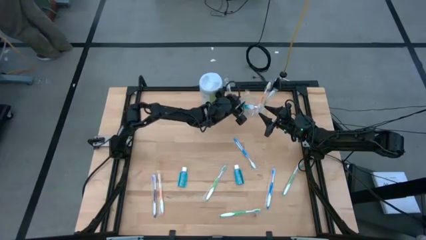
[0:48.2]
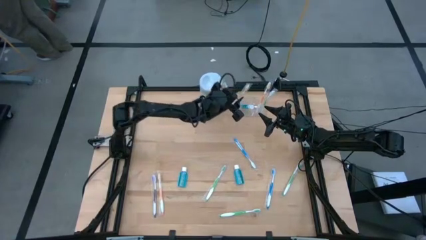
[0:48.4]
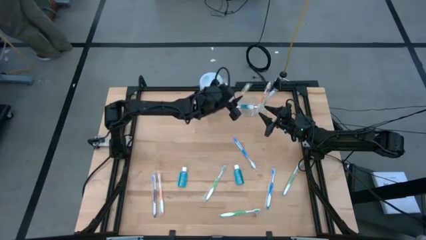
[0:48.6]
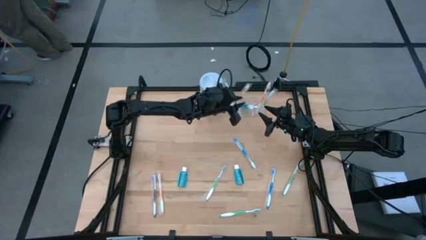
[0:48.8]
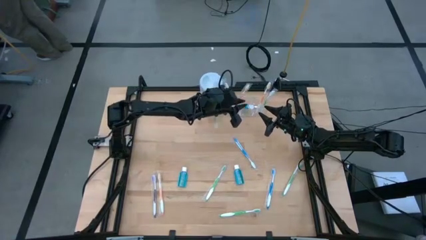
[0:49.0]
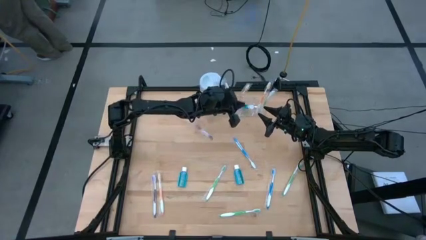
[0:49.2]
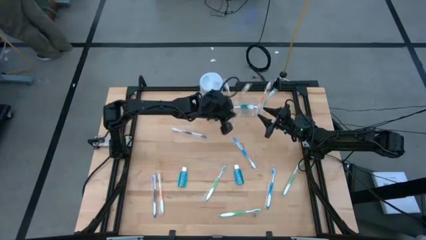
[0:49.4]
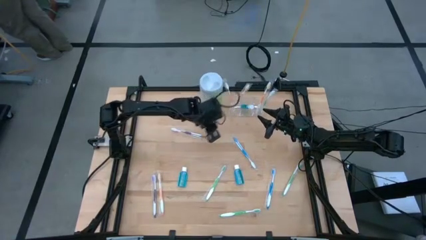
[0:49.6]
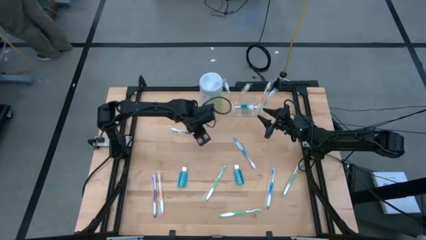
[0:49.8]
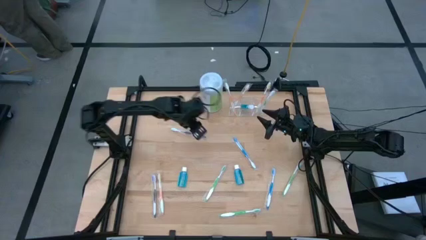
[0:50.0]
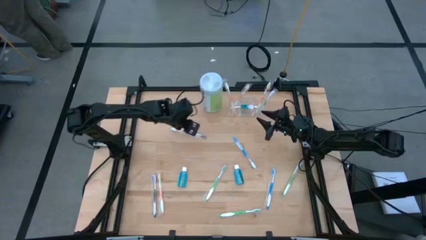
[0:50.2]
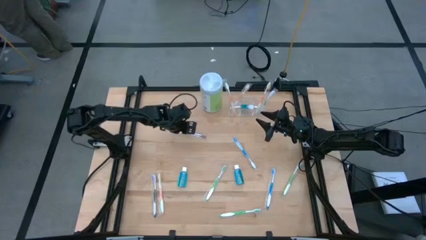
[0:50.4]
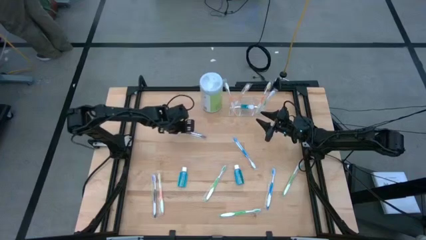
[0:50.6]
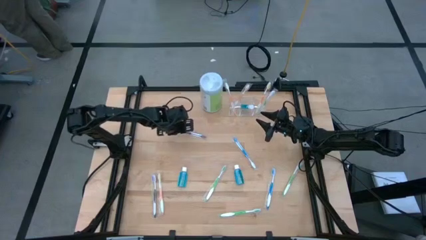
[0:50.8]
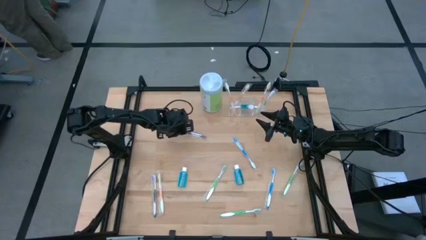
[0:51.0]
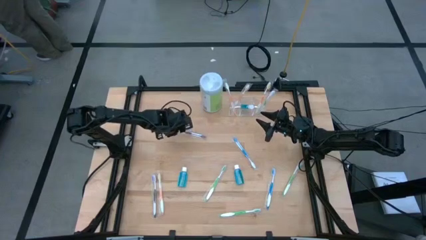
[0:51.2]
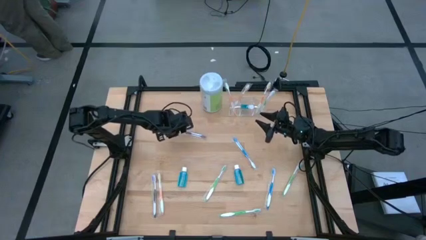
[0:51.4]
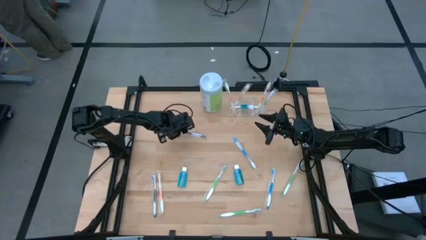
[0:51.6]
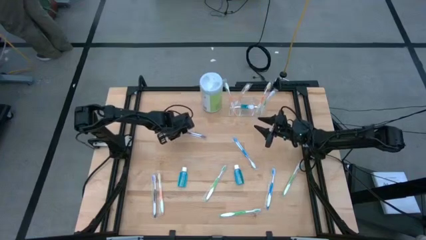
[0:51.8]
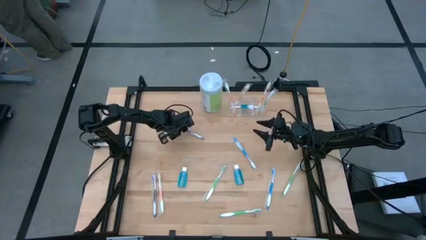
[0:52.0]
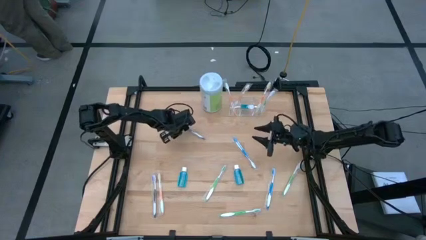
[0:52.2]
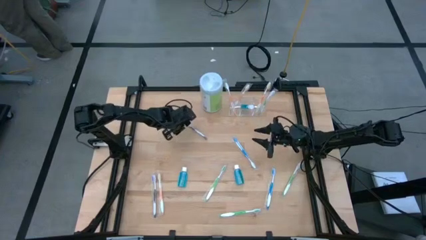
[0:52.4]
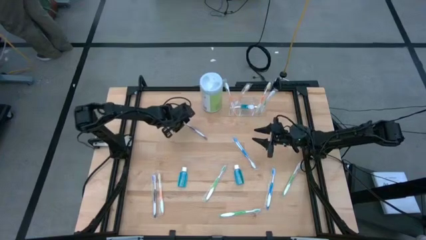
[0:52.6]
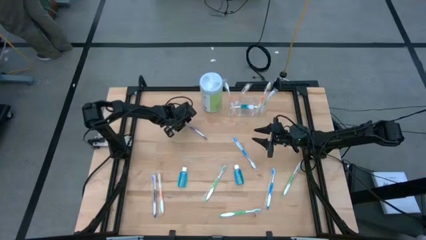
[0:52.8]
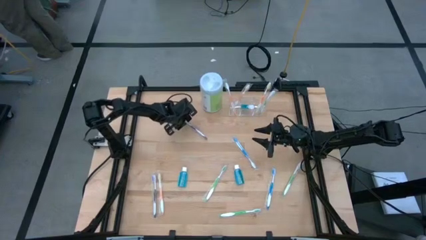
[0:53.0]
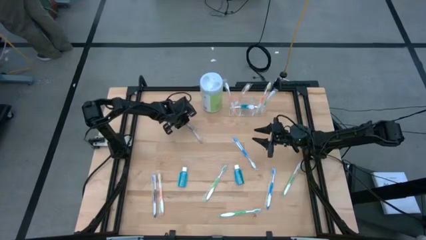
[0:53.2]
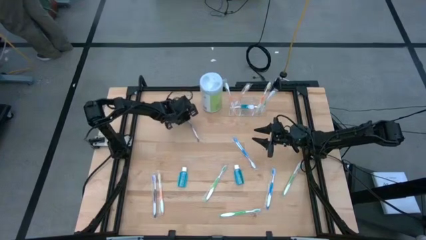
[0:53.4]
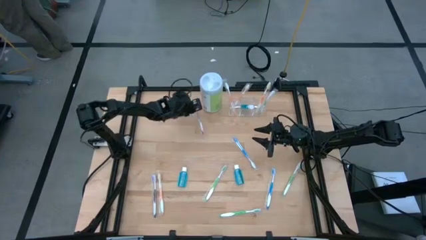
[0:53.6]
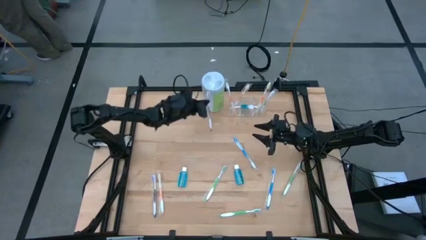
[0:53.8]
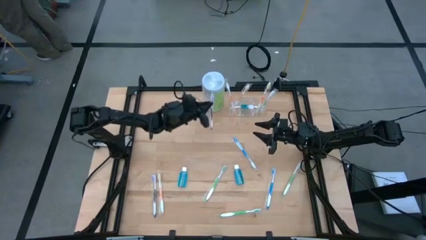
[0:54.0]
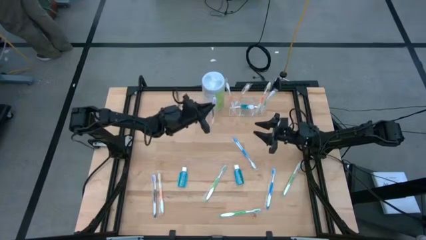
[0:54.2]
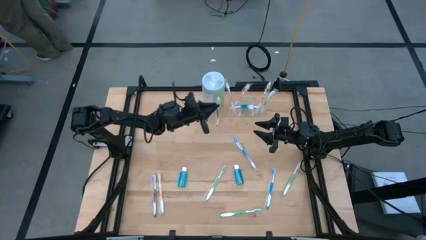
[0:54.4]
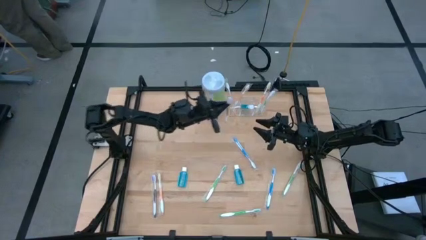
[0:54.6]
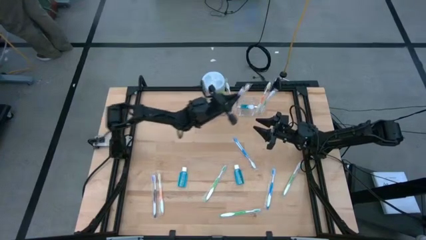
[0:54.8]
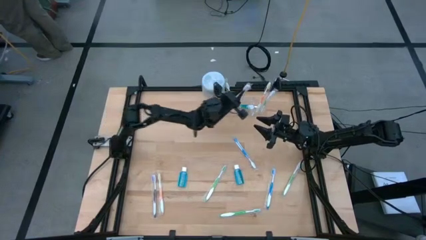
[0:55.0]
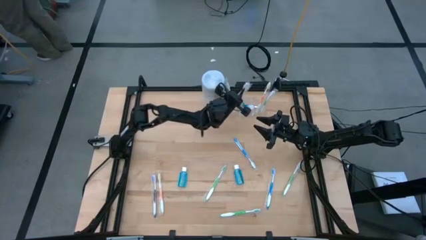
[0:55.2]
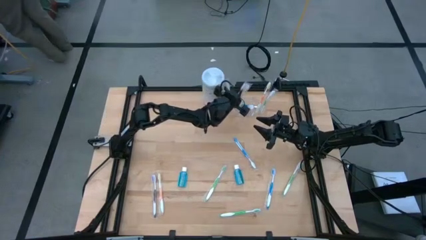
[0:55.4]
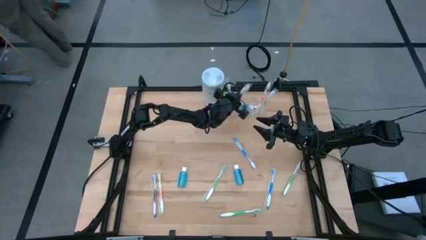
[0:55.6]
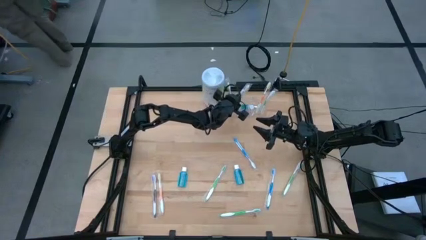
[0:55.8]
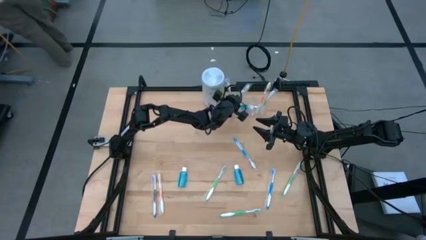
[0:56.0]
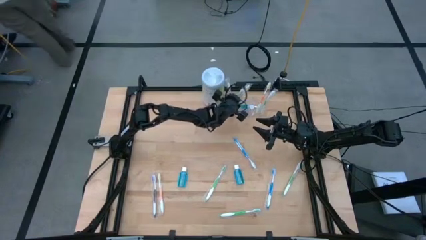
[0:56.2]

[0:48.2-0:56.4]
Task: Pick & Place toothbrushing station
Put the purple toothbrush into the transparent organizer

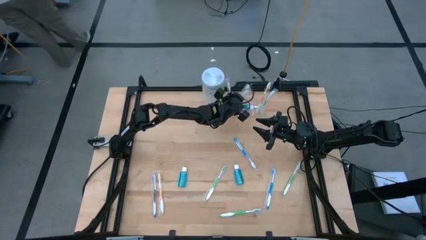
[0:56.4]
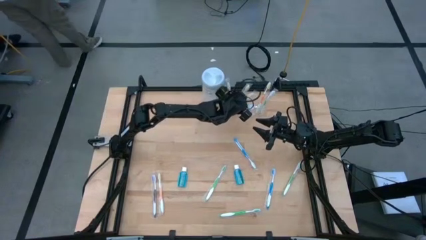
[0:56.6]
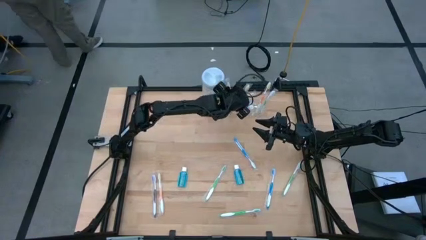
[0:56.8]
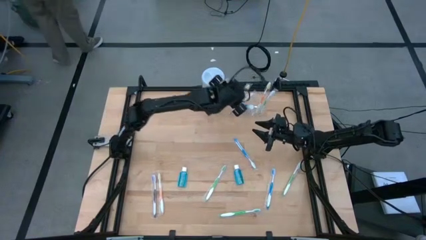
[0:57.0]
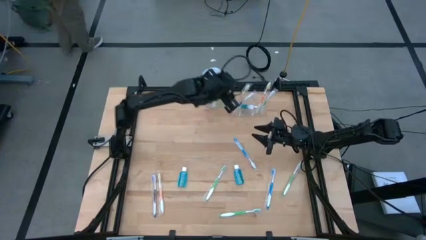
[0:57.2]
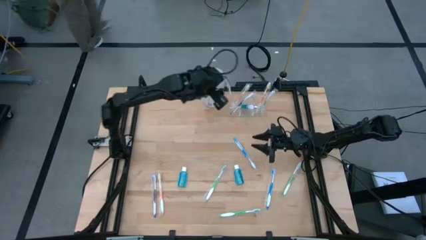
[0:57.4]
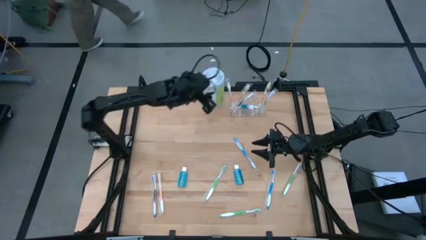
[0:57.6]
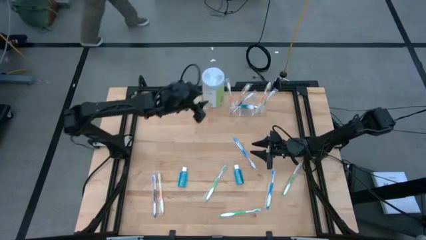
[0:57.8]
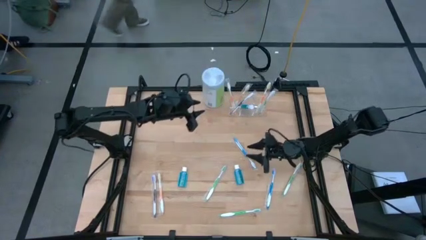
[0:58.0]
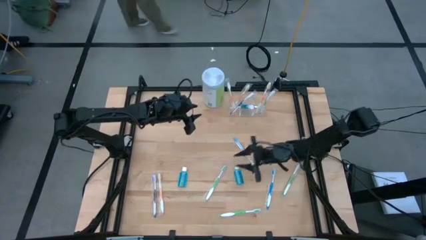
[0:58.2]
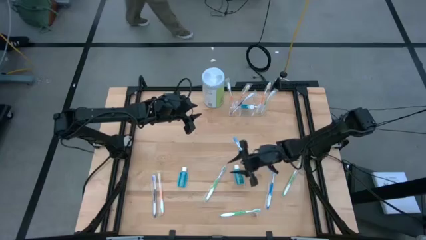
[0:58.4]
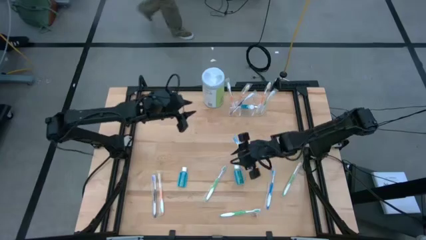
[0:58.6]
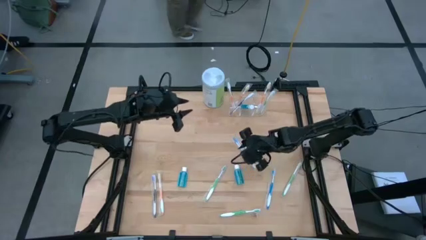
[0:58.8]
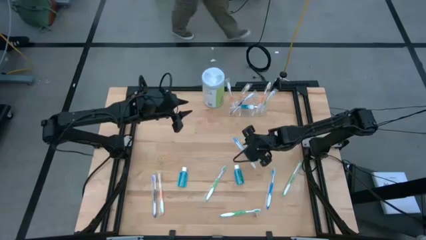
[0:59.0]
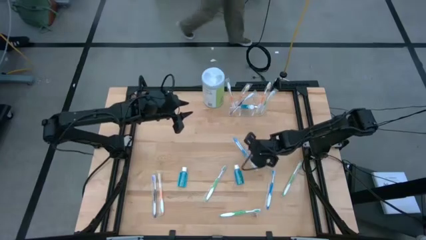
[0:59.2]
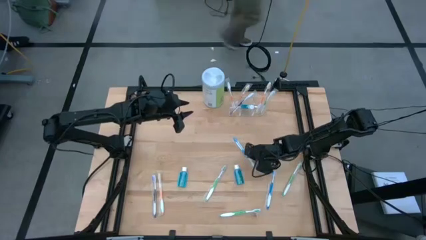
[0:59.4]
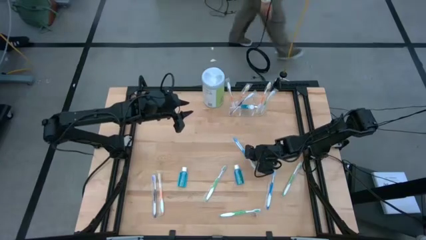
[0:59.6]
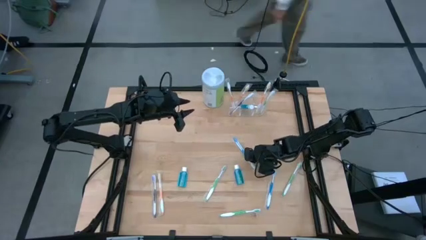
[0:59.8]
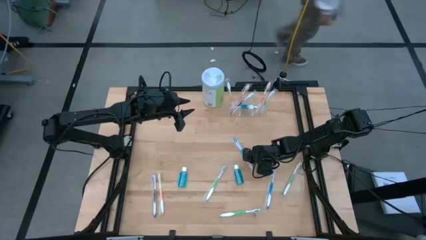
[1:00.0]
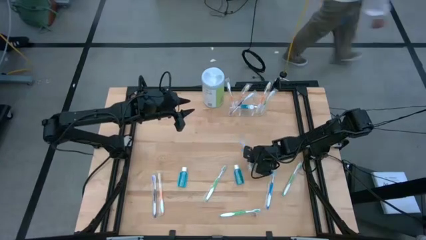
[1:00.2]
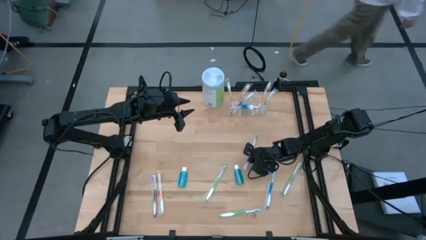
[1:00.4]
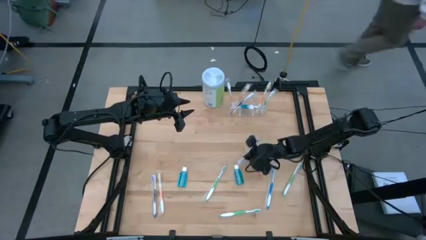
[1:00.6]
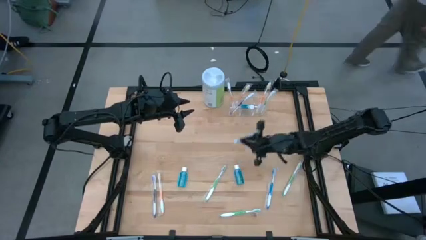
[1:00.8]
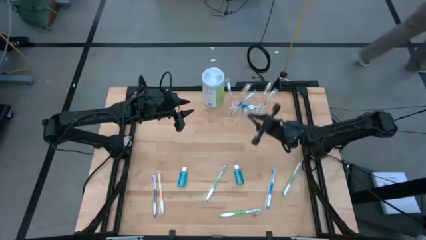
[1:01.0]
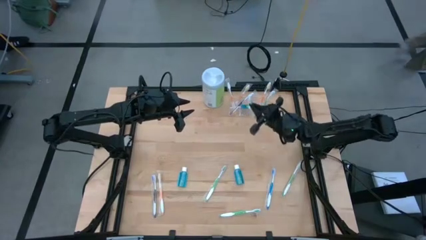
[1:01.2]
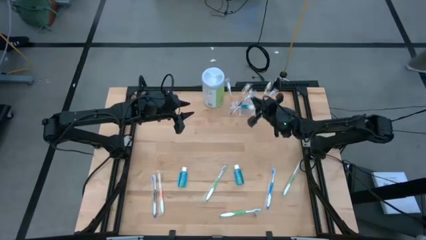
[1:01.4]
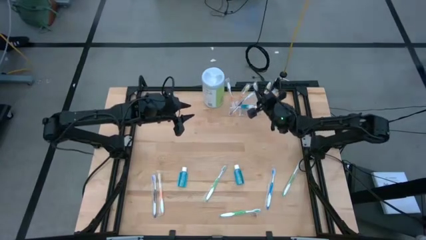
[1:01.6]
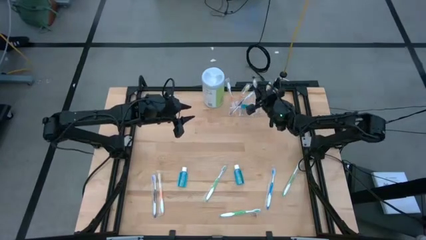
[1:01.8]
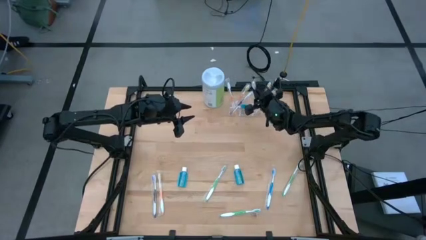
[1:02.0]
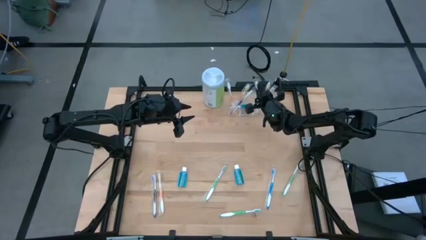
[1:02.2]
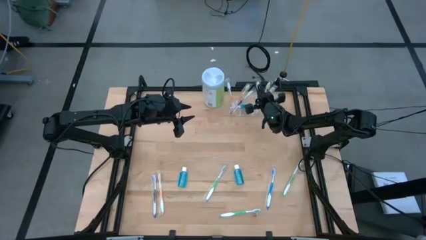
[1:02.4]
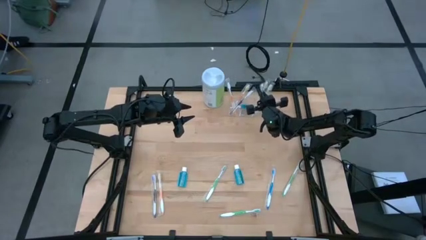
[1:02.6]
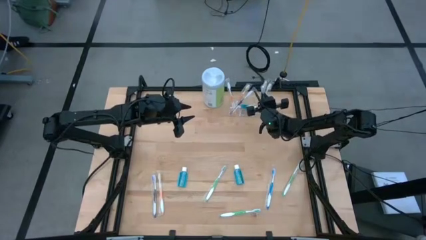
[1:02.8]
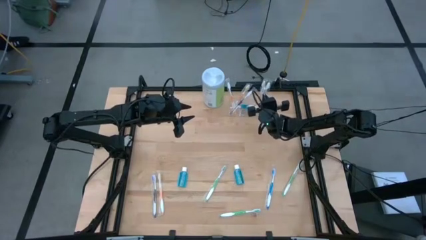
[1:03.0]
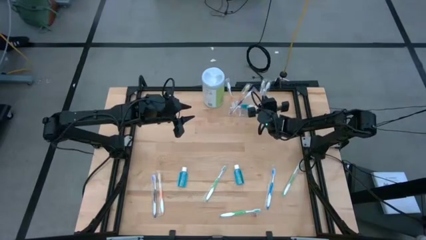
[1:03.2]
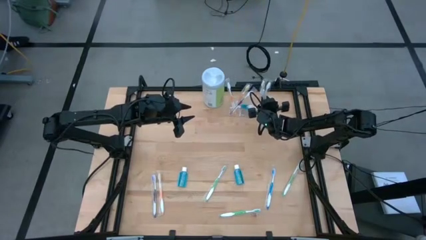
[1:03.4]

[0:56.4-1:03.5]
Put the blue toothbrush into the transparent organizer

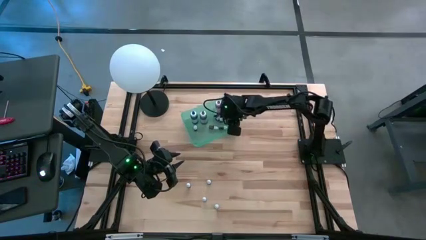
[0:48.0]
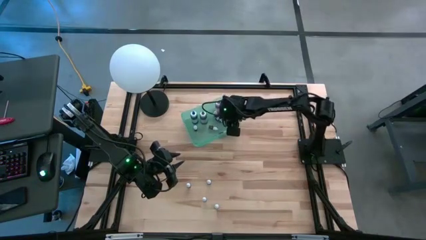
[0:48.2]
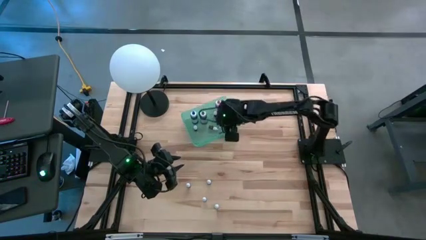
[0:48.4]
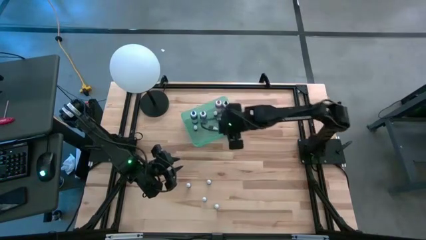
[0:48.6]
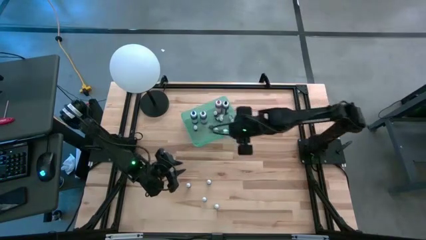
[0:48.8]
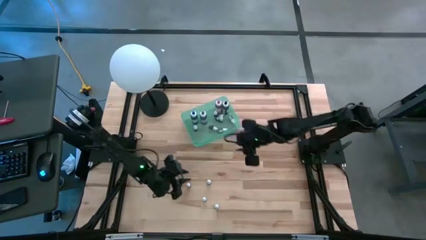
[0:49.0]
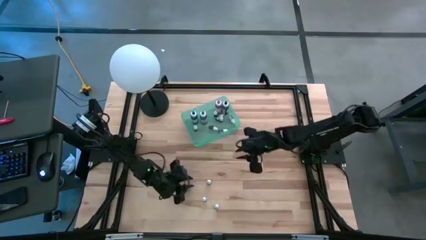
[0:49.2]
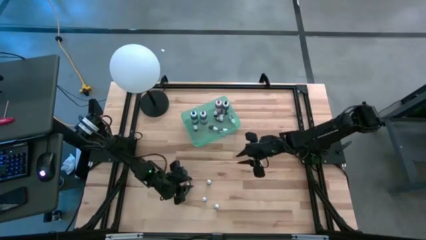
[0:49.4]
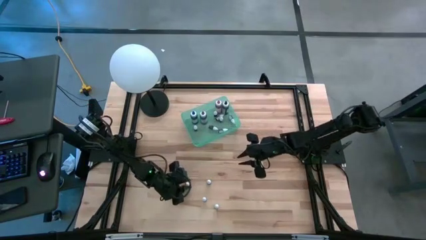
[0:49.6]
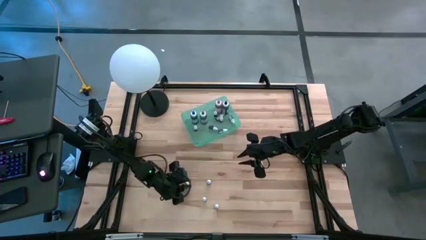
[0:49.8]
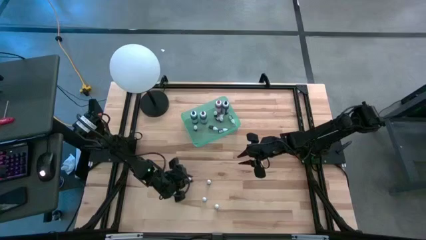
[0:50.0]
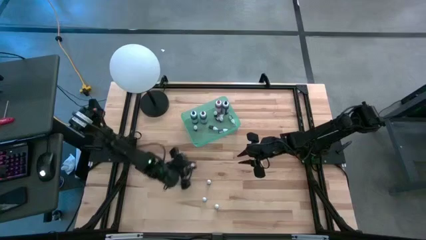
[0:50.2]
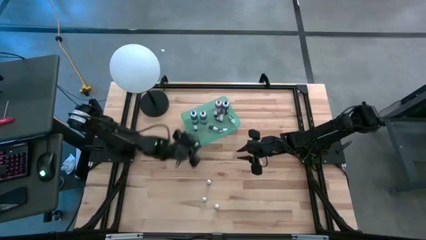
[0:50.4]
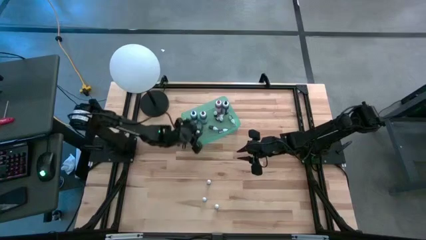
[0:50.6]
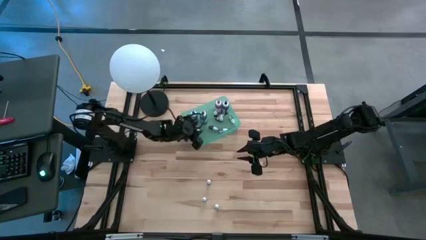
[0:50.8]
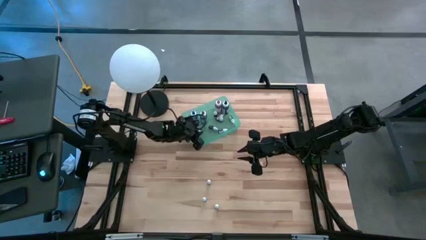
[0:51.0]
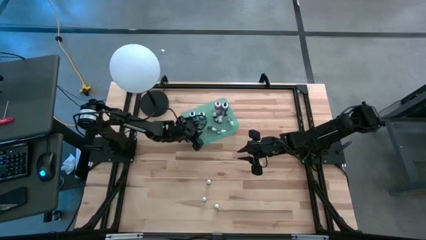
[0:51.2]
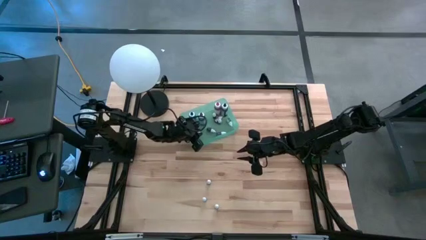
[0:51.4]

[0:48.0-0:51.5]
Task: Pick & Place food coloring
Put the small red bottle into the blue bin
